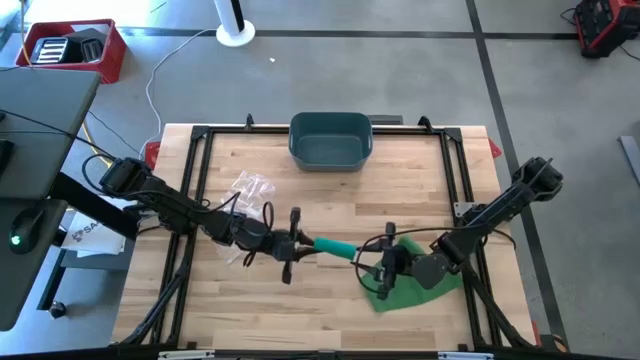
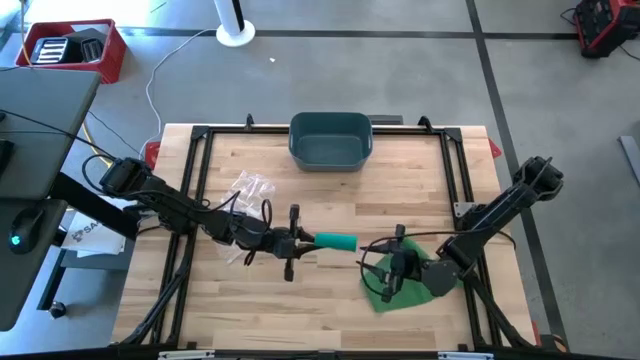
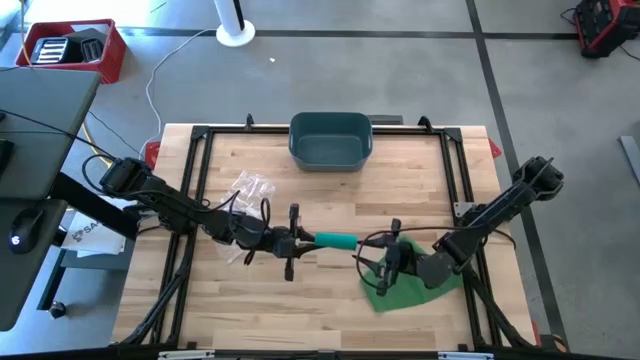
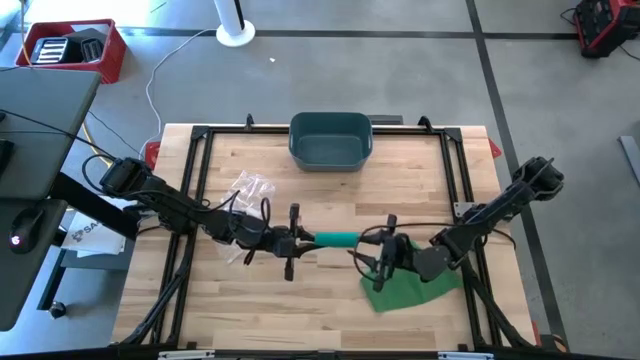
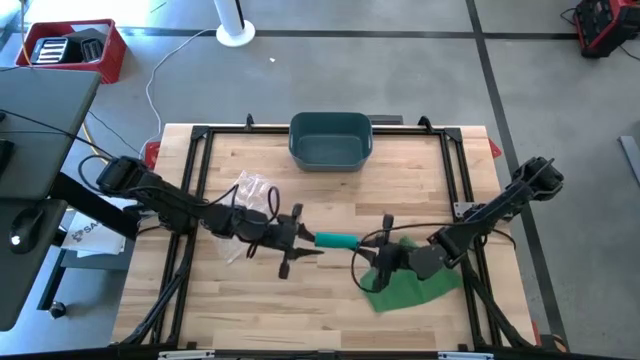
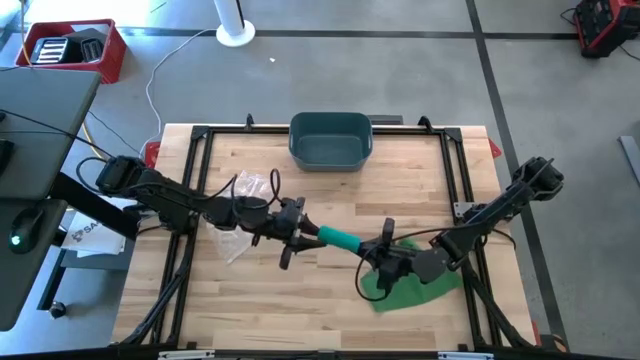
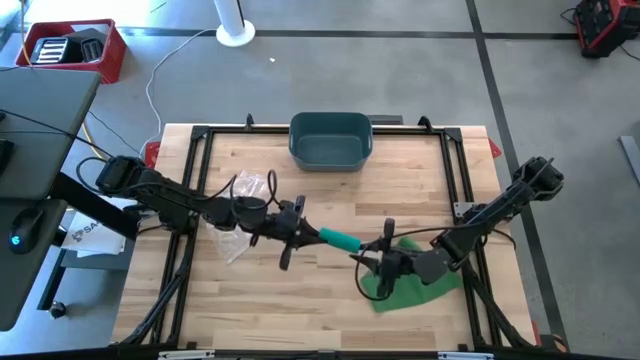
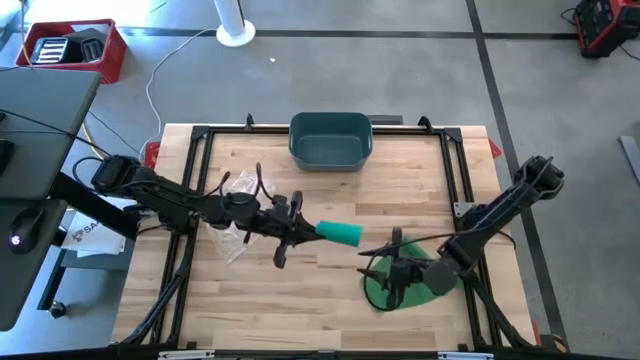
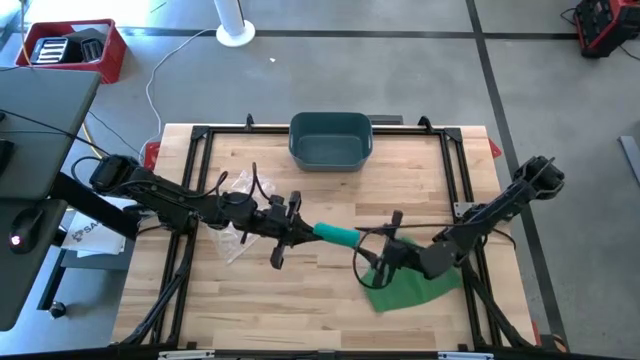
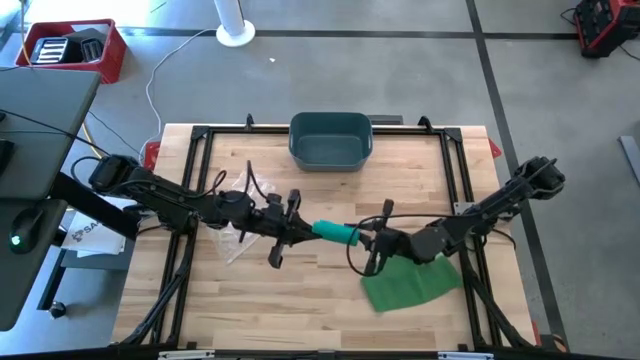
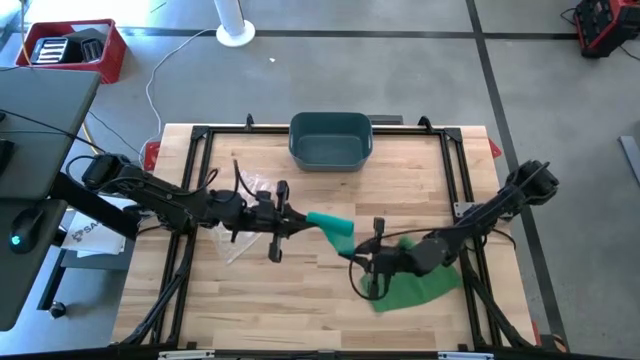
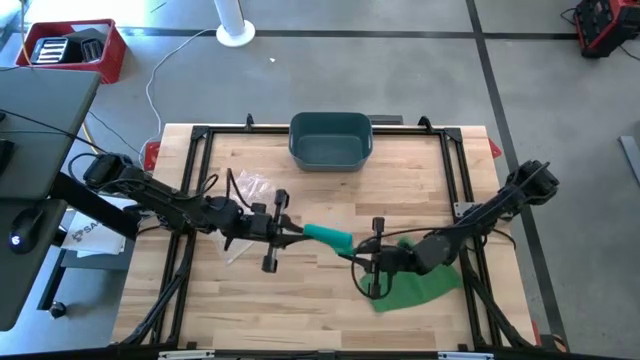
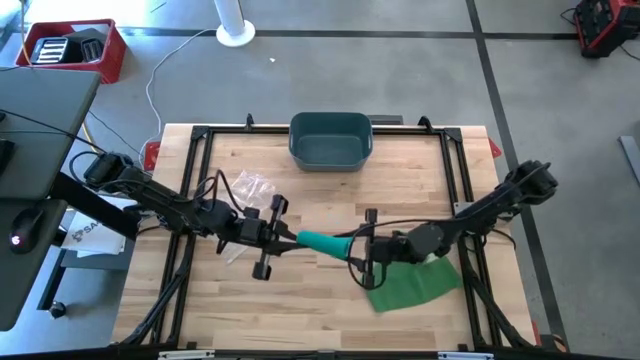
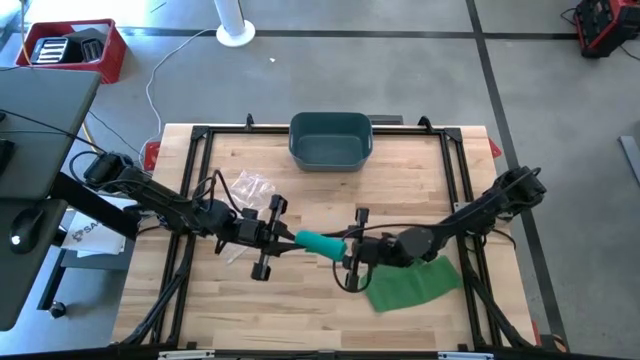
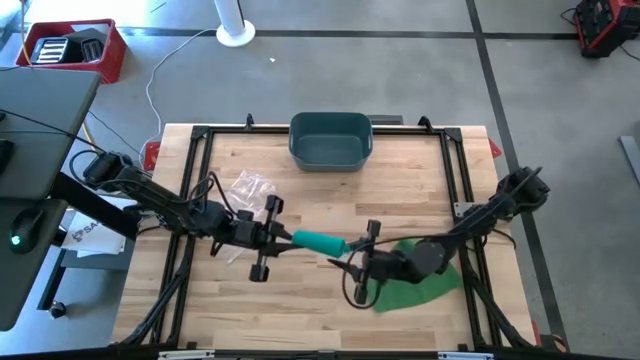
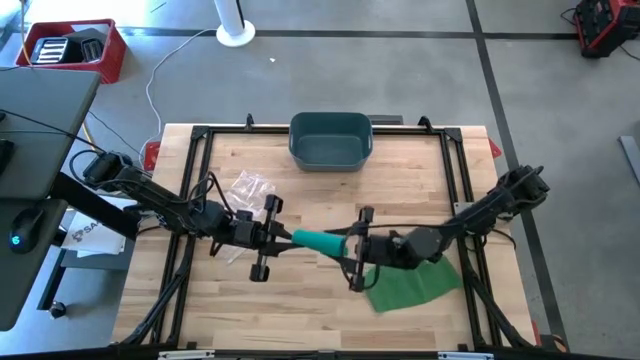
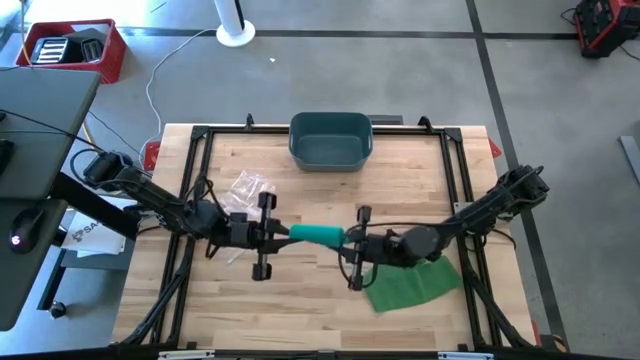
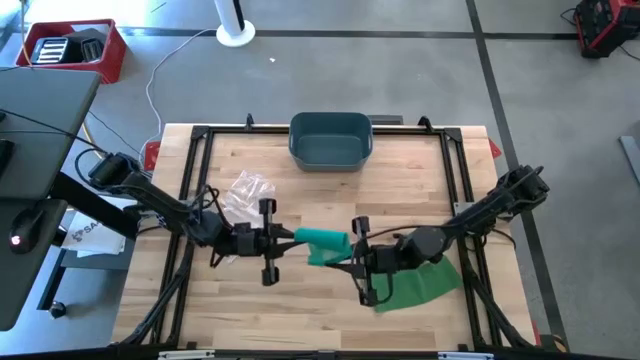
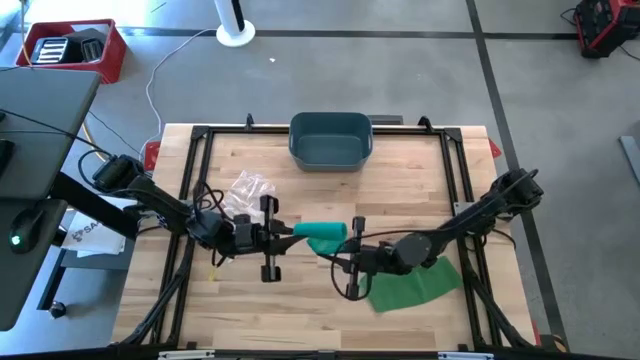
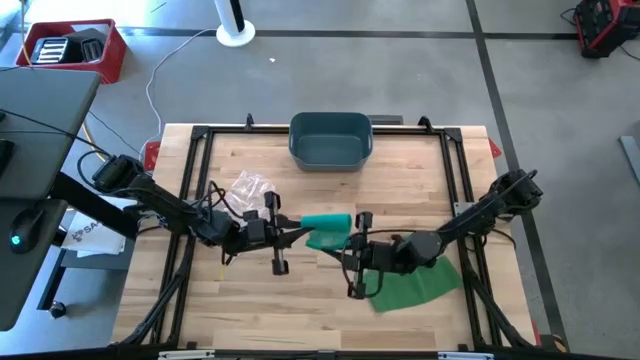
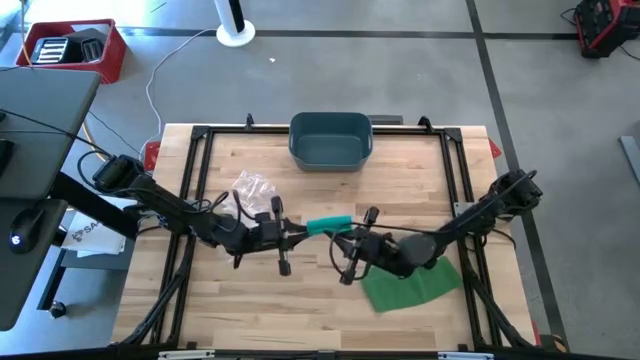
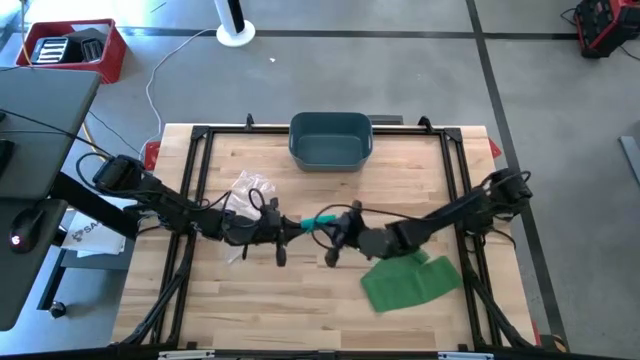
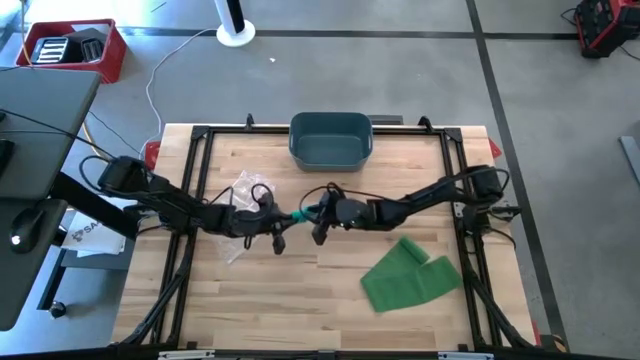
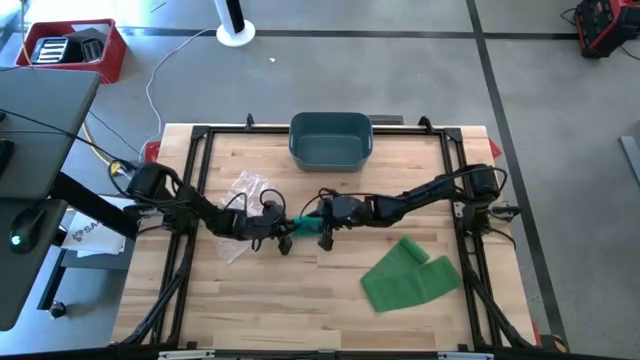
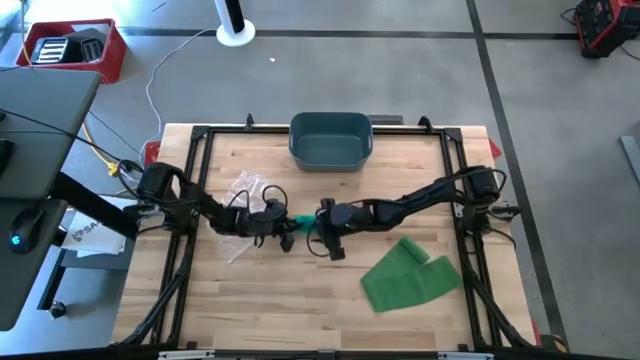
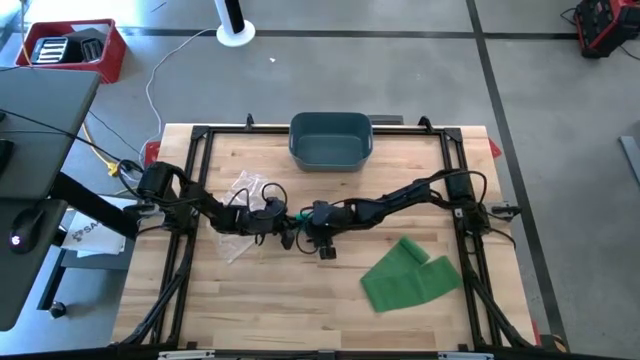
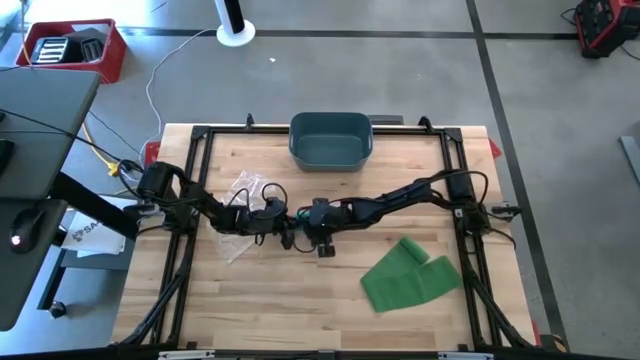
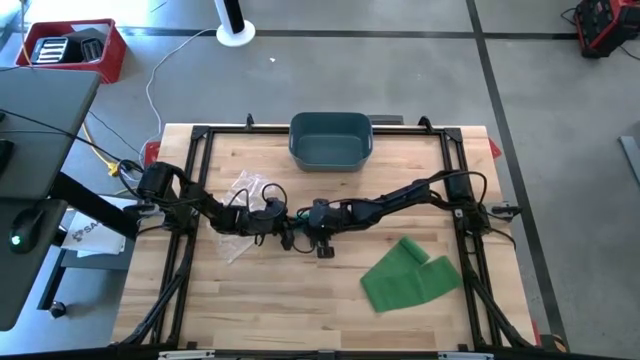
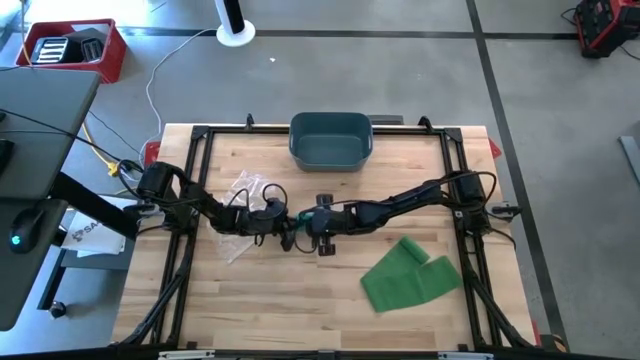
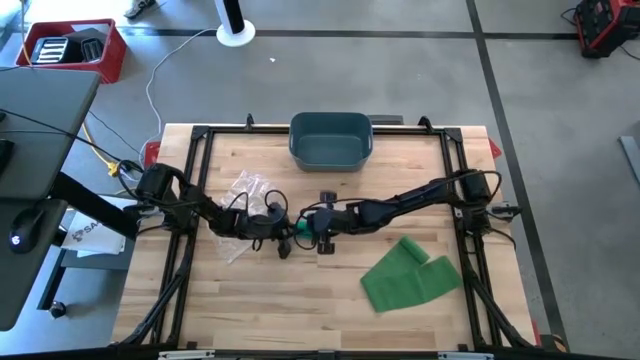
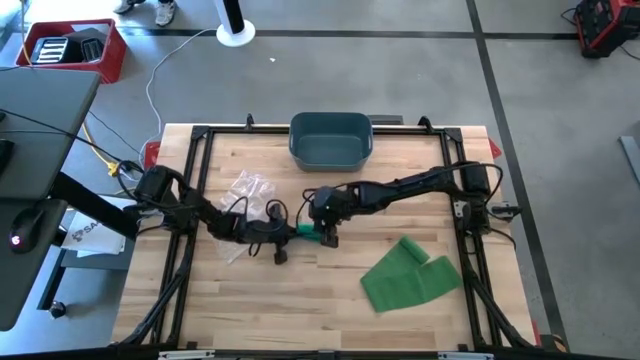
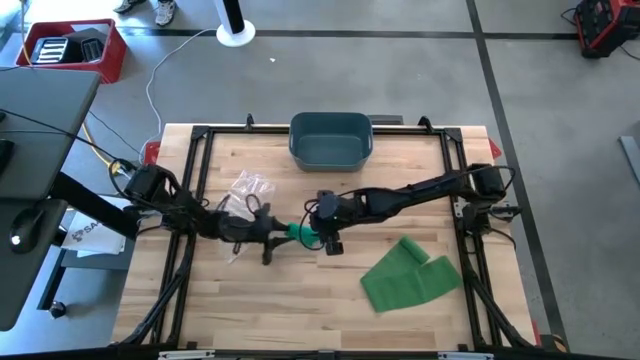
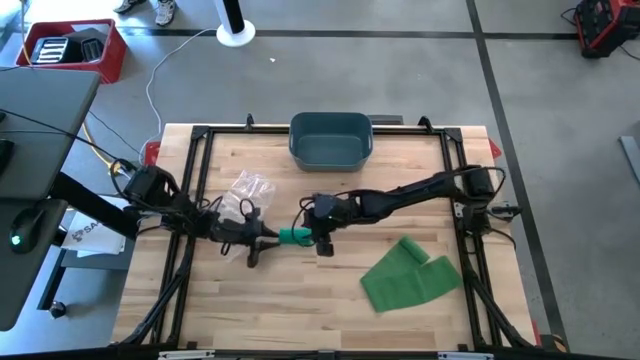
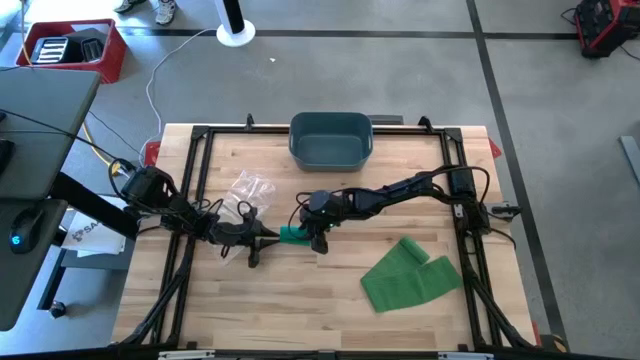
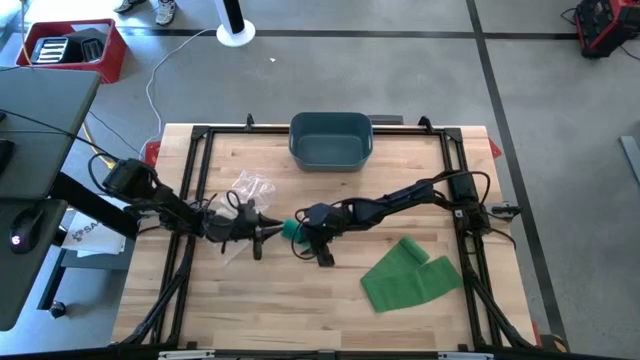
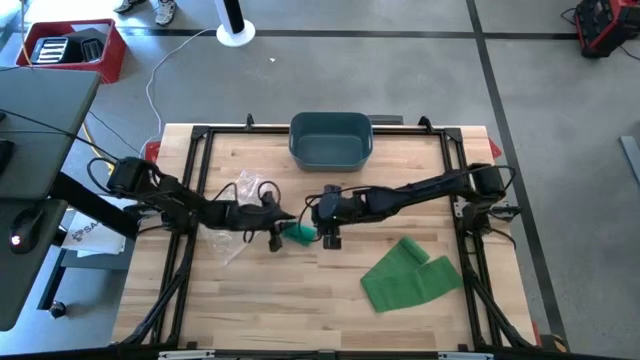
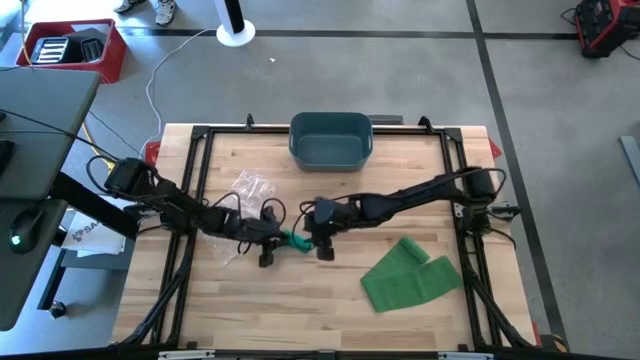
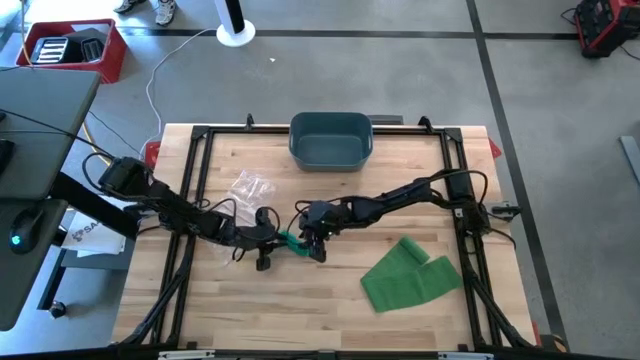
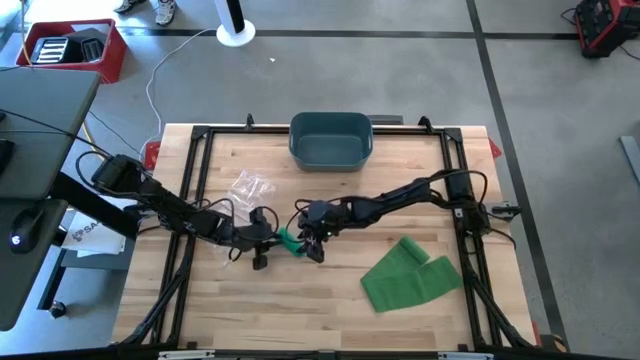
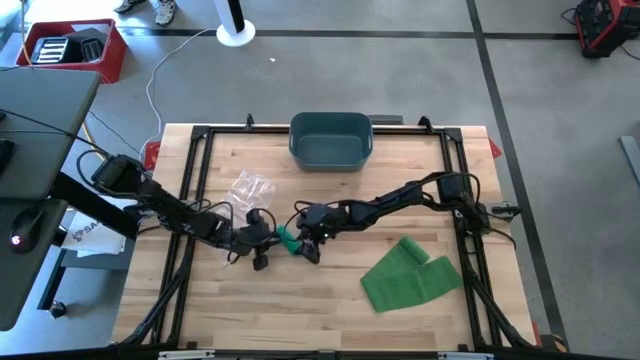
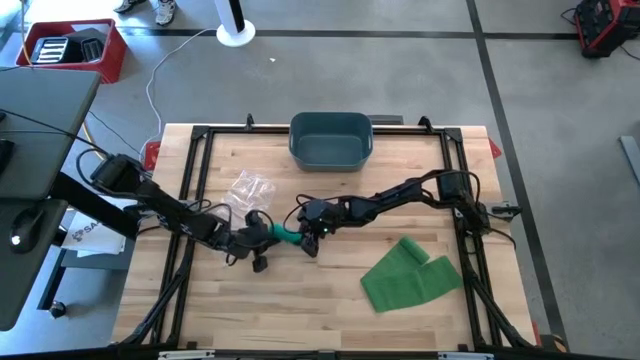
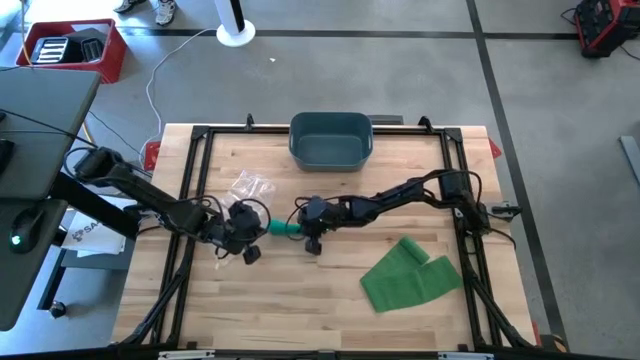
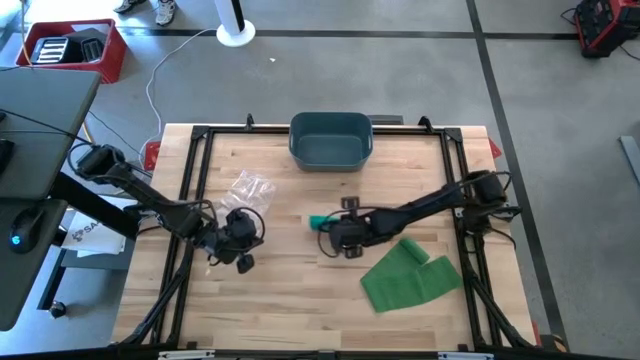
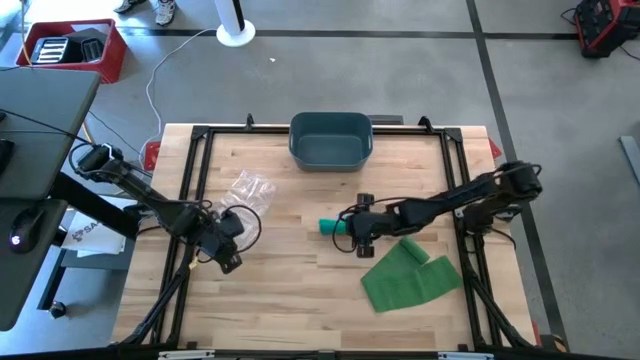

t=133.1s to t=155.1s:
Task: Roll bandage
Roll the blue bandage
